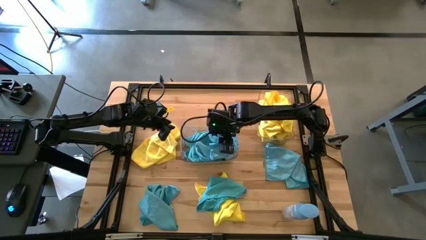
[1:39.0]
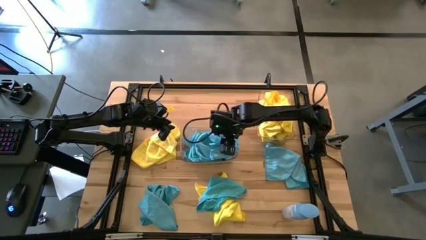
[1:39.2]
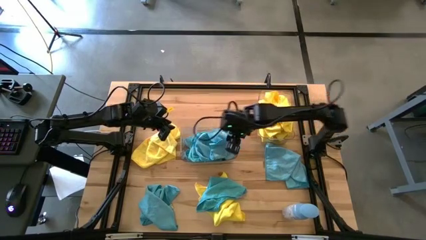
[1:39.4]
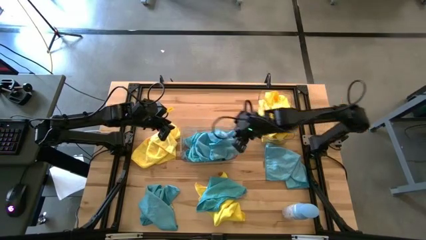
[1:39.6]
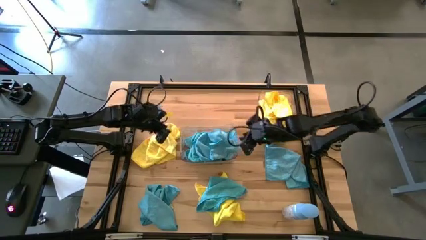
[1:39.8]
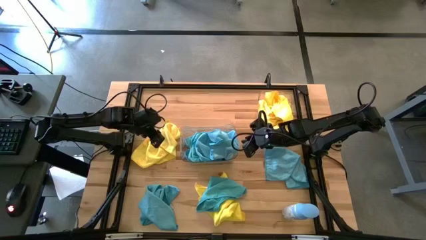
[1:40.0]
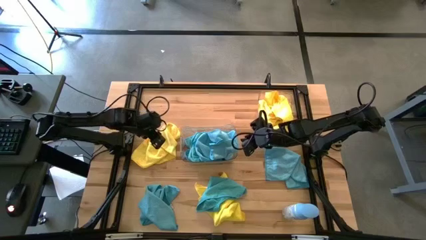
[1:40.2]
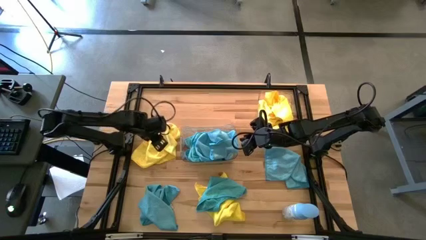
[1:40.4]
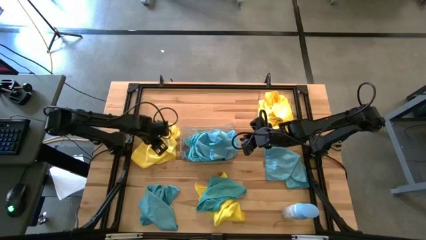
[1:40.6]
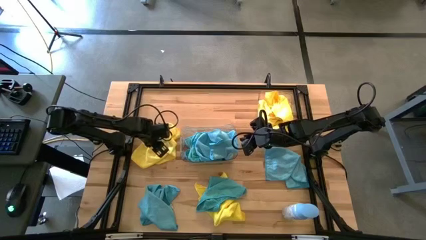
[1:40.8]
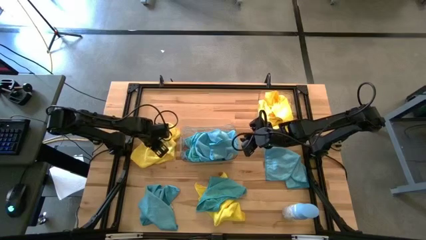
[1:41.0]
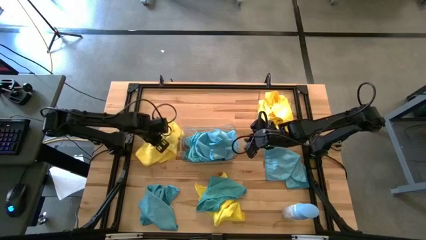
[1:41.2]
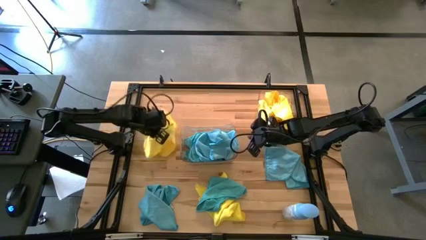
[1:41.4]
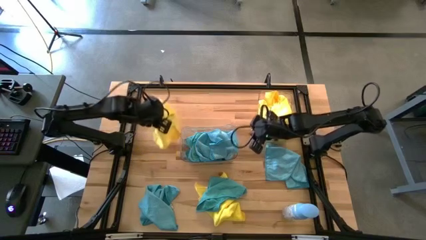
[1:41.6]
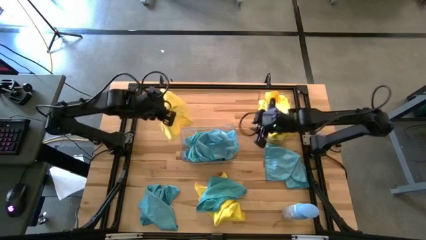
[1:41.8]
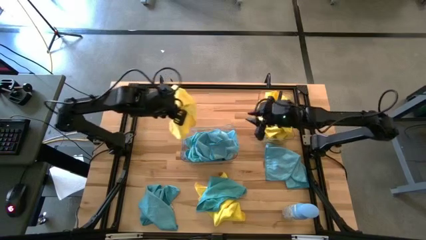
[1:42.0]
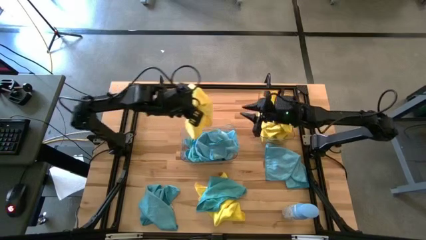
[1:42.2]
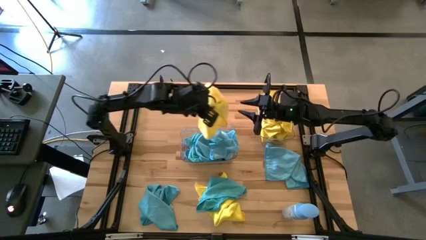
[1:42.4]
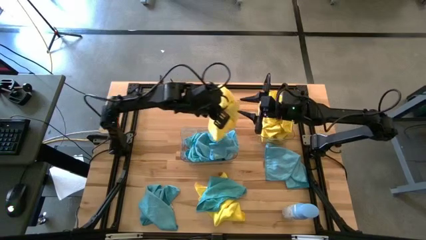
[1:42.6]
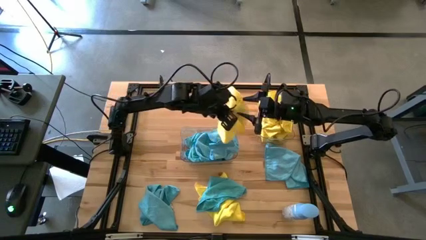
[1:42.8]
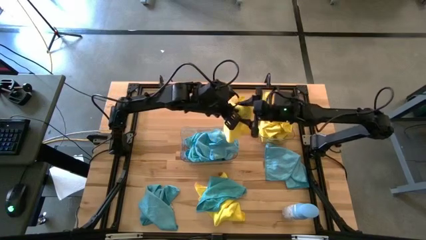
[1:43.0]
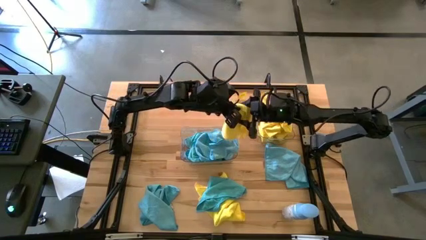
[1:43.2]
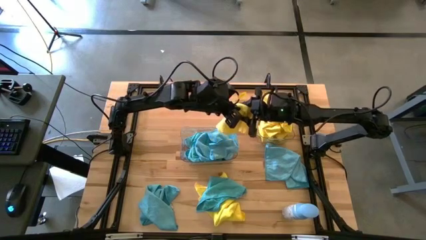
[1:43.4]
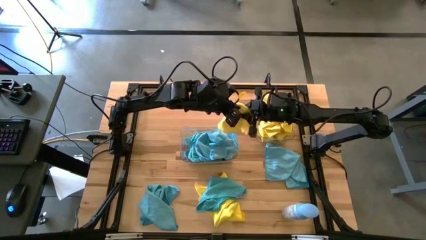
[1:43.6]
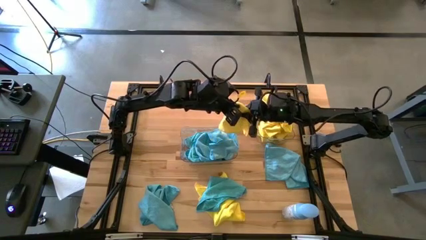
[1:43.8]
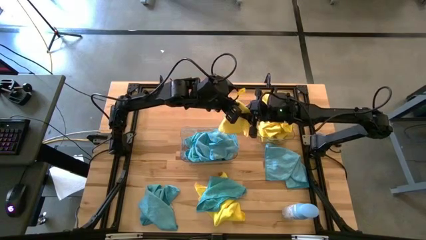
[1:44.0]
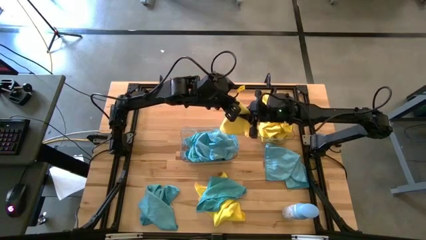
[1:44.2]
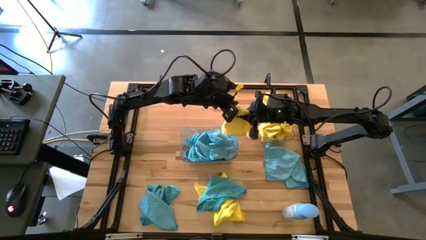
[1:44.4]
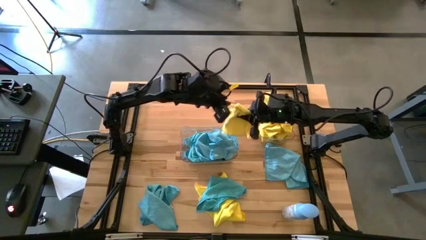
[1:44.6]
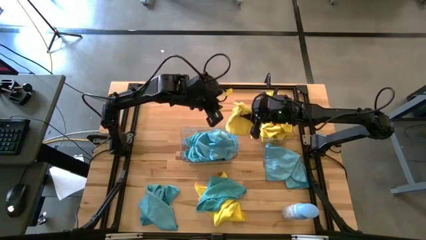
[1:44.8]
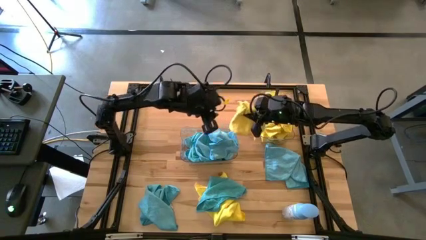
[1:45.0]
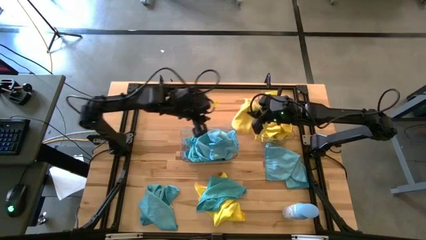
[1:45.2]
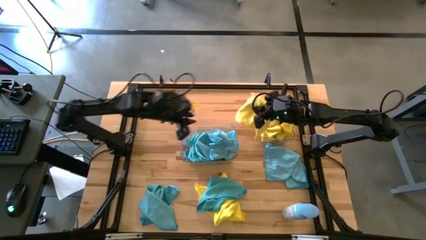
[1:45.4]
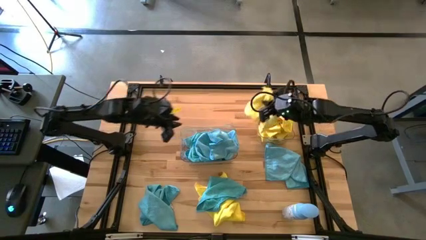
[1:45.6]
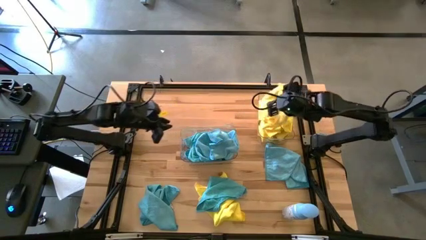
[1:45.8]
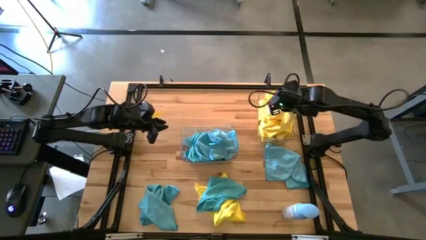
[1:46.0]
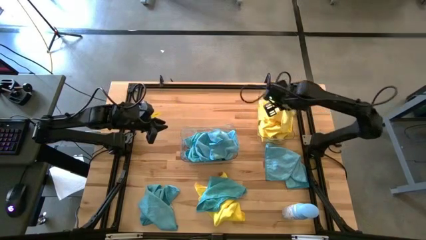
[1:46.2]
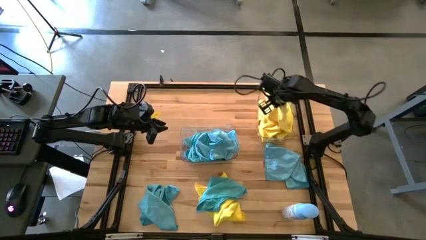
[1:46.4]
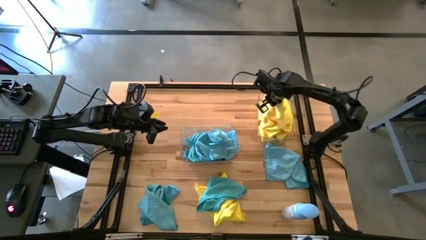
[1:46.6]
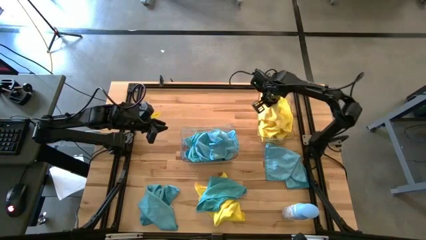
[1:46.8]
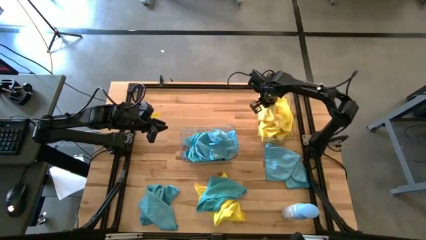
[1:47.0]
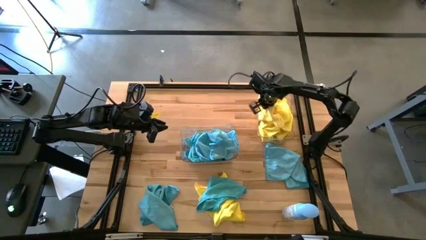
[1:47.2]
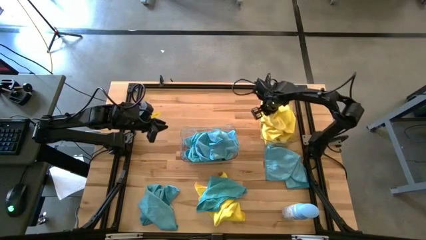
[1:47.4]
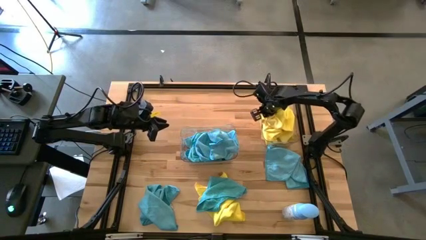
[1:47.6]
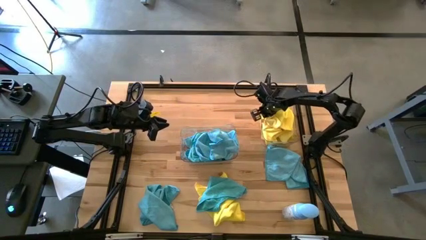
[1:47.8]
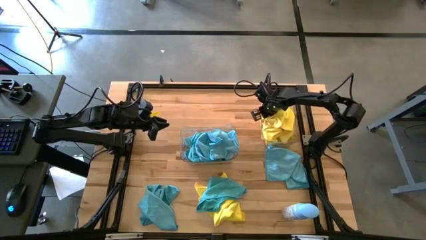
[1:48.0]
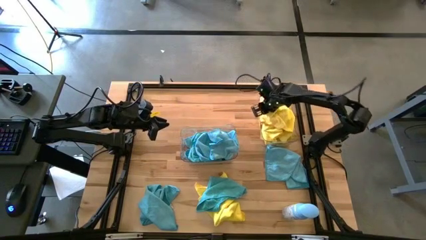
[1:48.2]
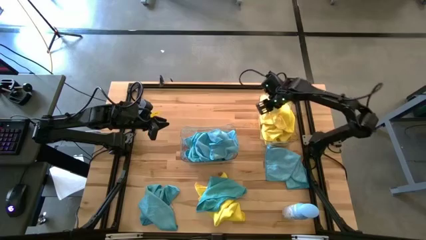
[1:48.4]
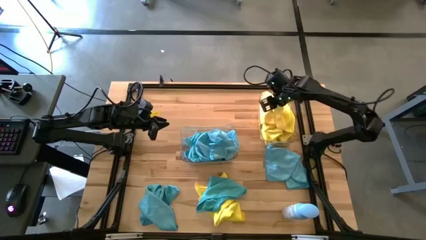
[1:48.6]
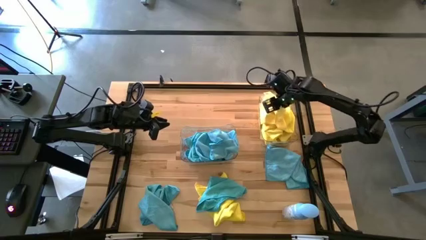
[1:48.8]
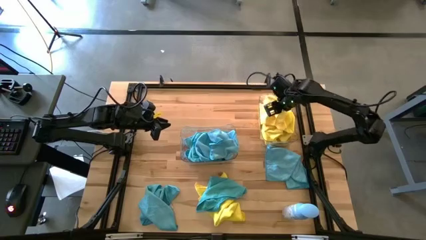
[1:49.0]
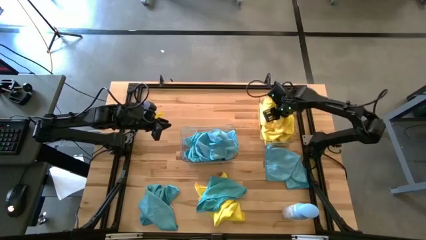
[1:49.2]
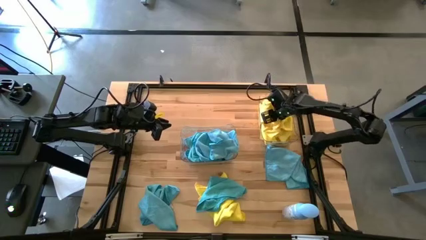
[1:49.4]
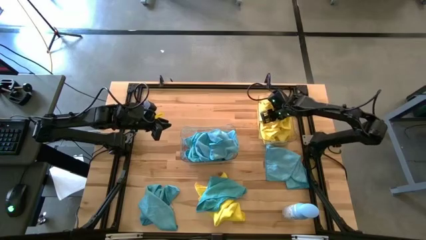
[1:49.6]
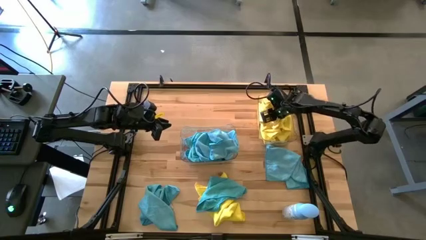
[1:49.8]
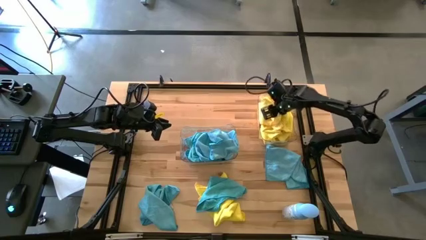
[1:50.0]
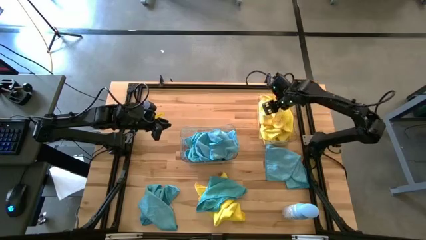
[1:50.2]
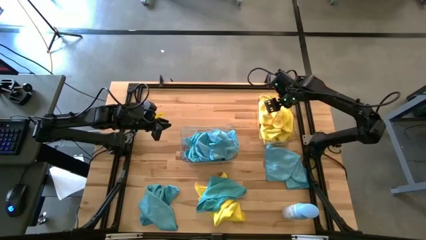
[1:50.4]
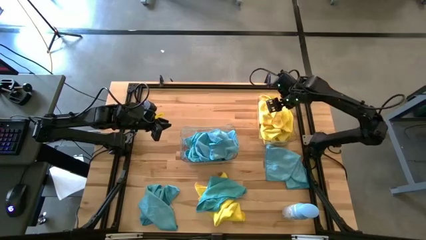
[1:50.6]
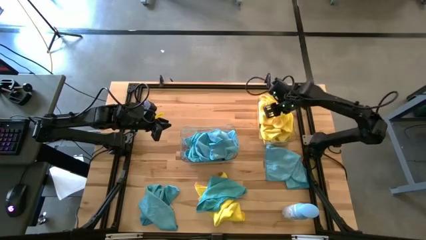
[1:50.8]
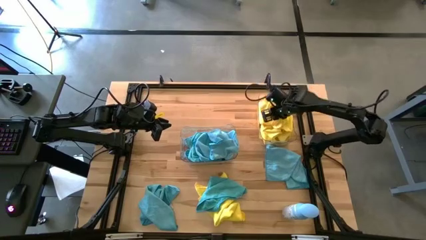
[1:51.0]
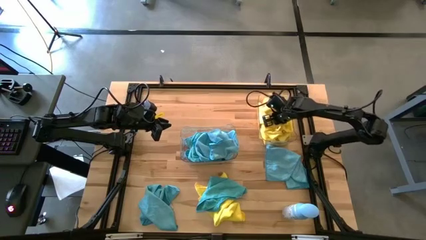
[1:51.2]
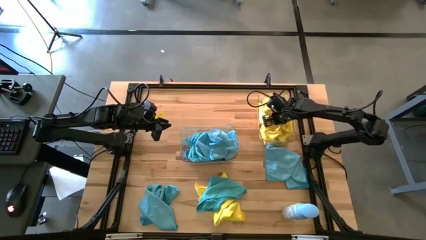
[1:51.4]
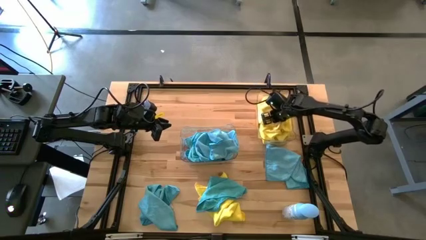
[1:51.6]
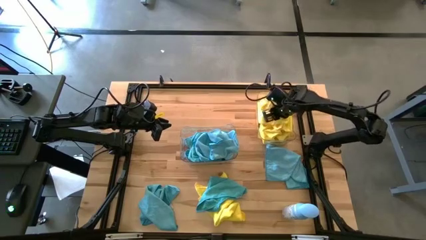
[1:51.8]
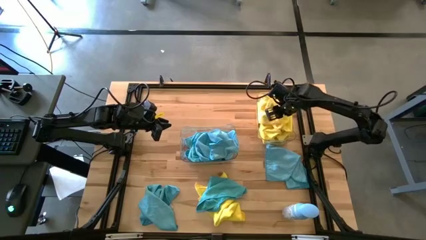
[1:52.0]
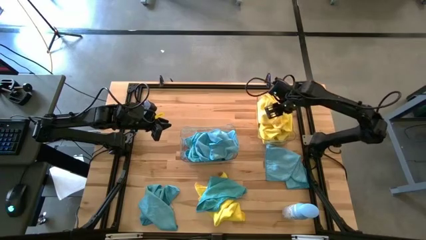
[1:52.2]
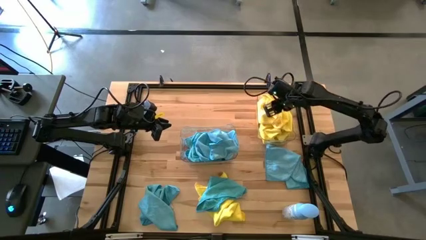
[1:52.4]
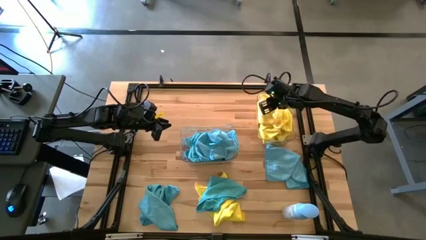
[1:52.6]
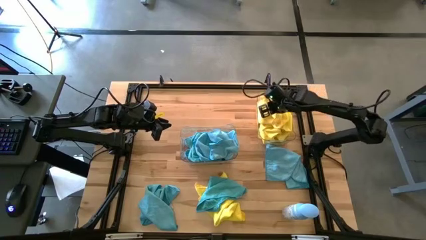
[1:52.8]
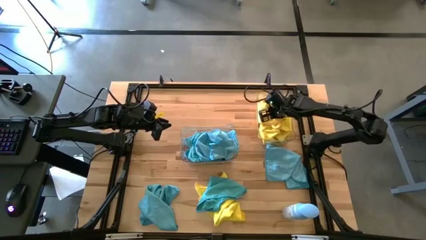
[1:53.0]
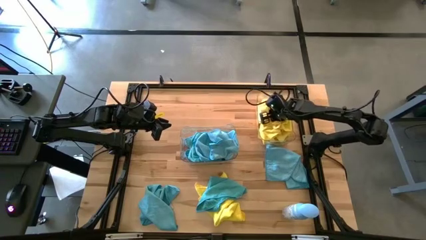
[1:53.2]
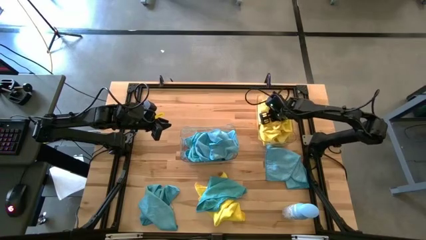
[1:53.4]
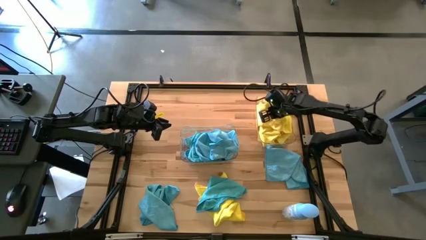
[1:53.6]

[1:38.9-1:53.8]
Task: Sort microfiber towel by color & place in baskets
Put the yellow towel into the top transparent bin

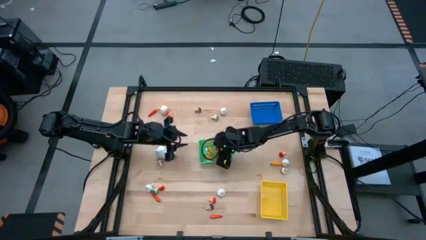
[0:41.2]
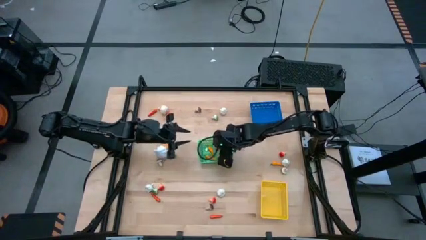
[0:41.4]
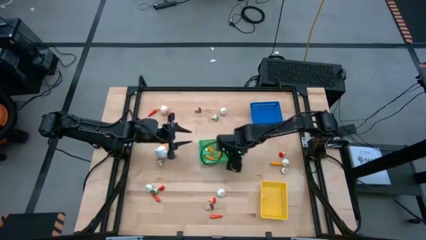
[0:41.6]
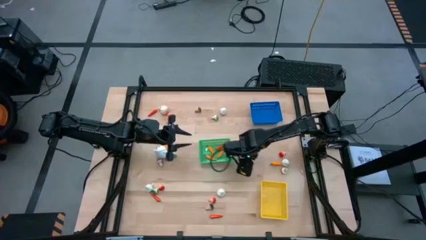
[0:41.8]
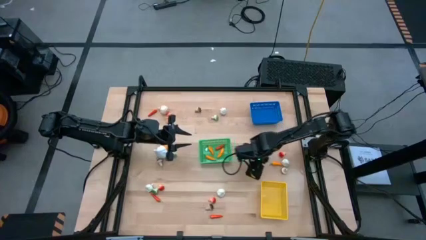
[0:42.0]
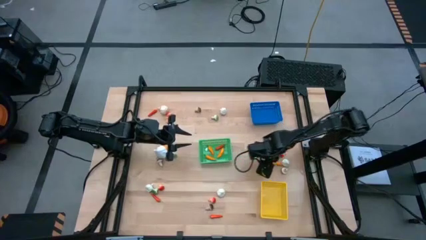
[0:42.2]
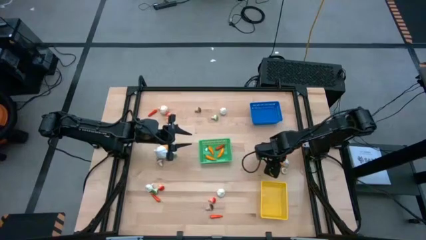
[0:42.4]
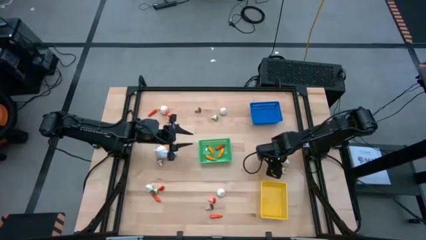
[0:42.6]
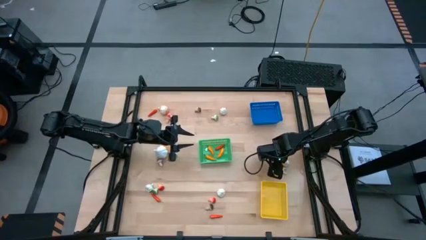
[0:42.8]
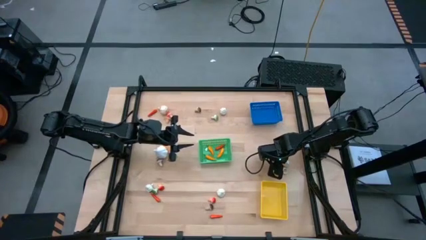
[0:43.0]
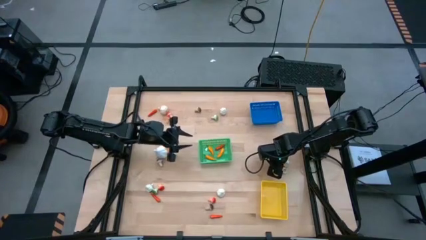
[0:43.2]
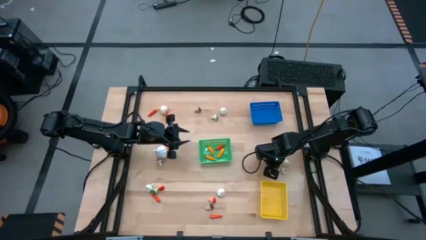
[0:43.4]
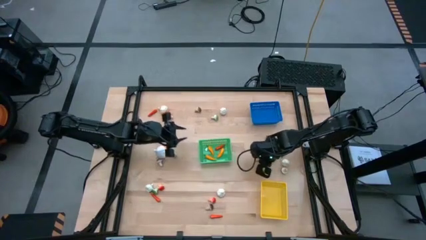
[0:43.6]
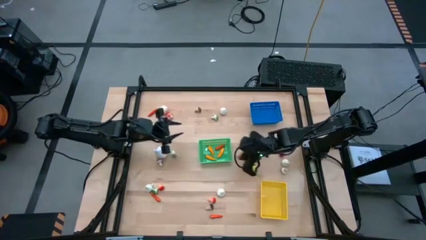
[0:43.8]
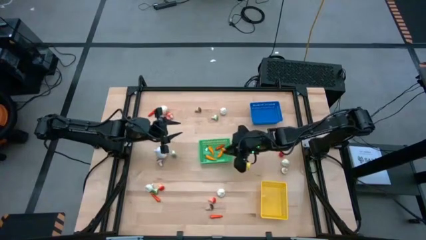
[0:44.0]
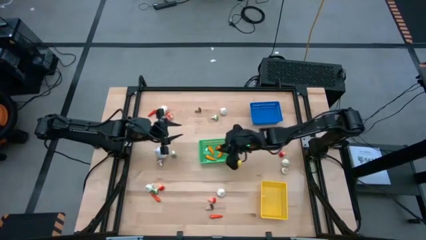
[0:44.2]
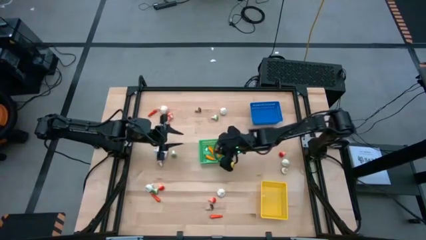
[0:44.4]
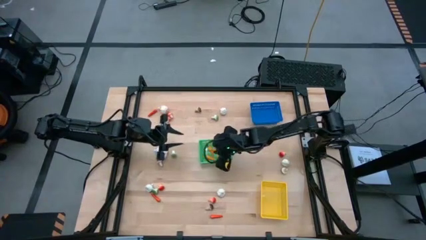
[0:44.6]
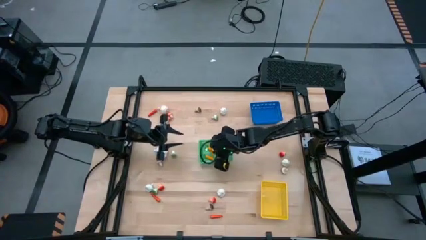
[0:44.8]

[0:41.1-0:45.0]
Task: Sort produce into baskets
Put the yellow chili pepper into the green bin
